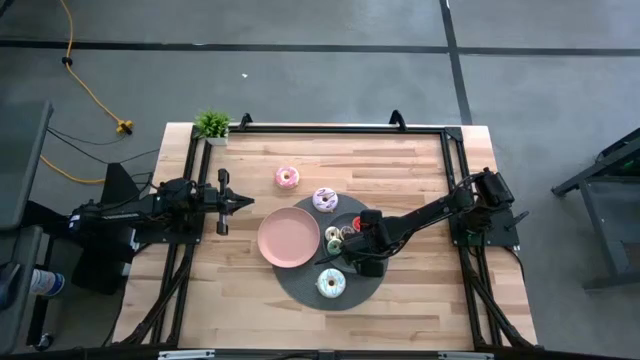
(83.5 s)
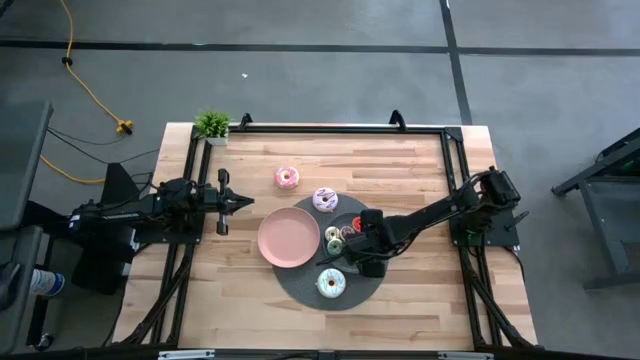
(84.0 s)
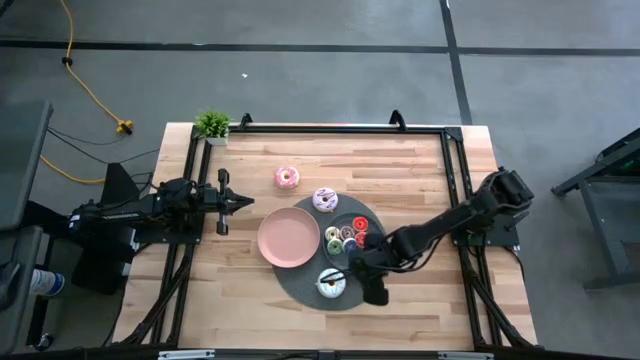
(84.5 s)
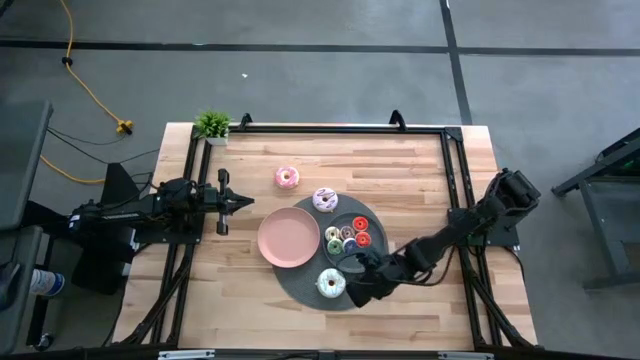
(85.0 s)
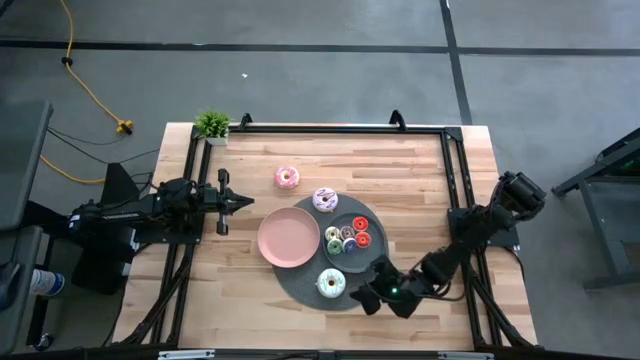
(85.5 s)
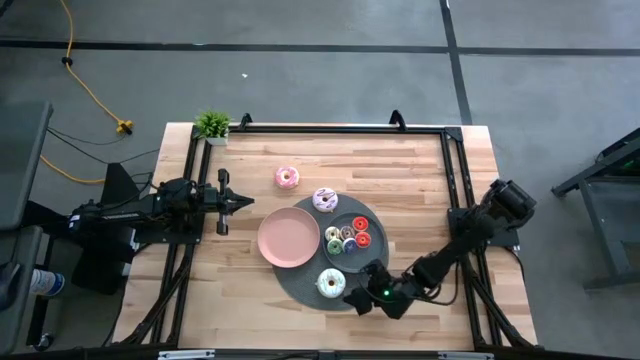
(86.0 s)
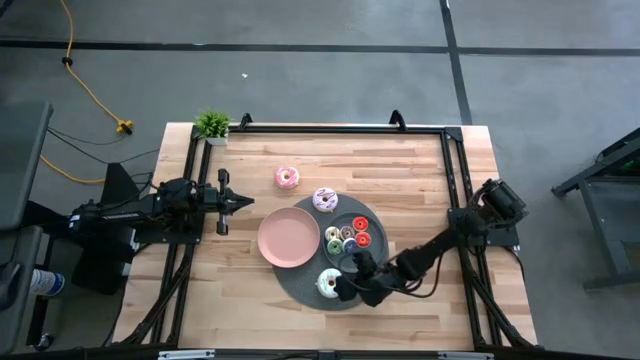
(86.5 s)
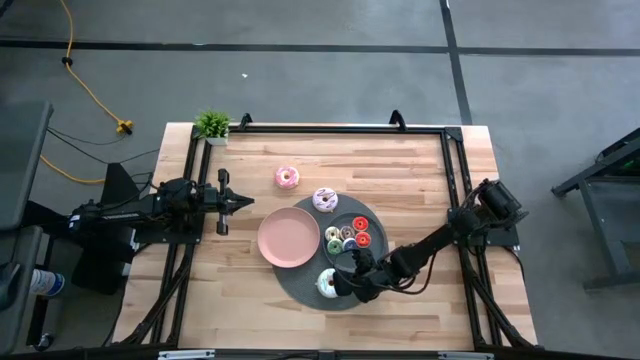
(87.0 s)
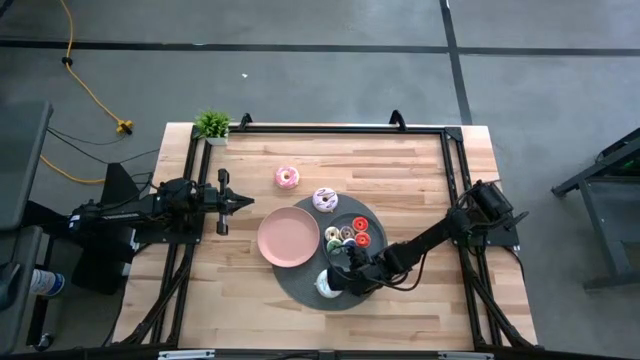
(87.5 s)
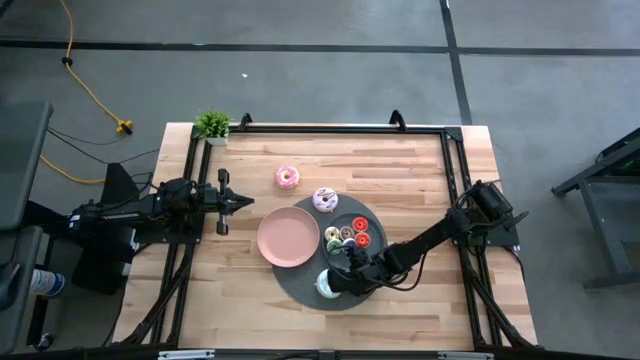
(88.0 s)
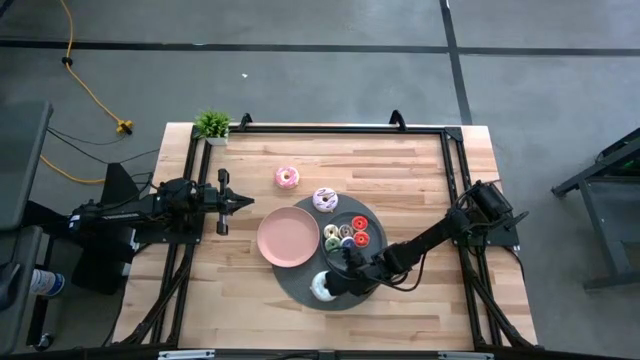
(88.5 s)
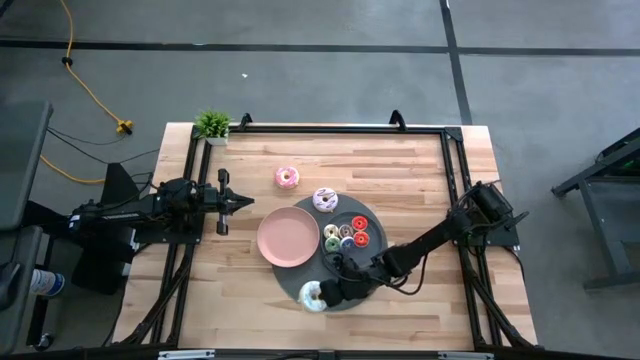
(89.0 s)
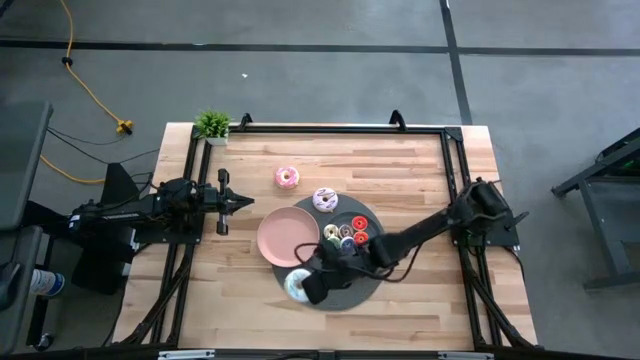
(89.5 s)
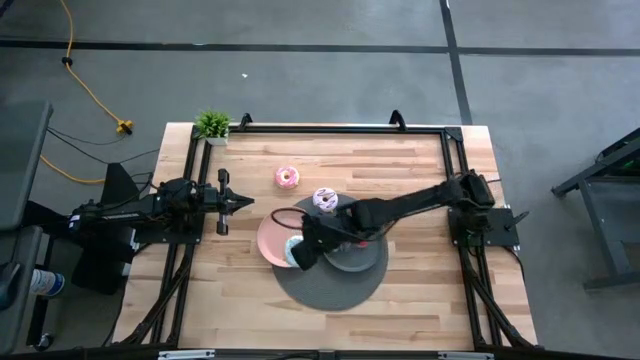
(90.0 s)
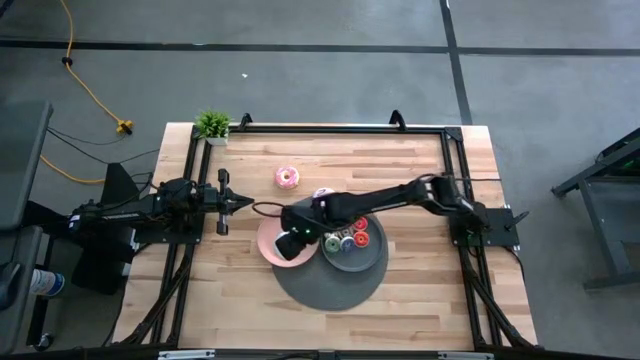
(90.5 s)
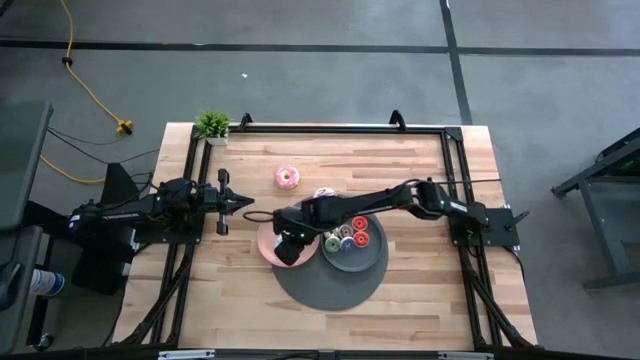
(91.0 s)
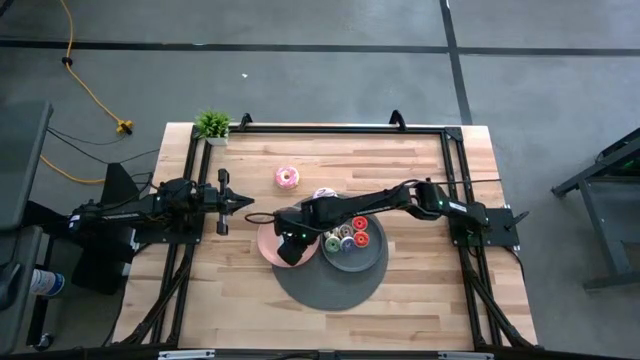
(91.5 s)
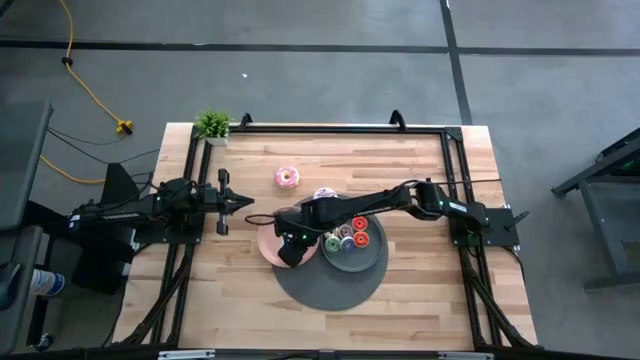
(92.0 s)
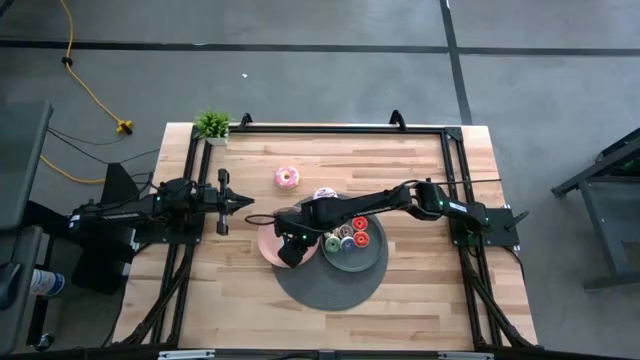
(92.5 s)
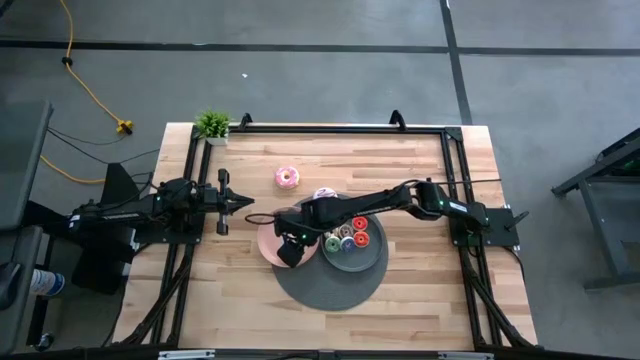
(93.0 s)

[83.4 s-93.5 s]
Task: Pick & Place donuts
Put the big white donut on the pink plate

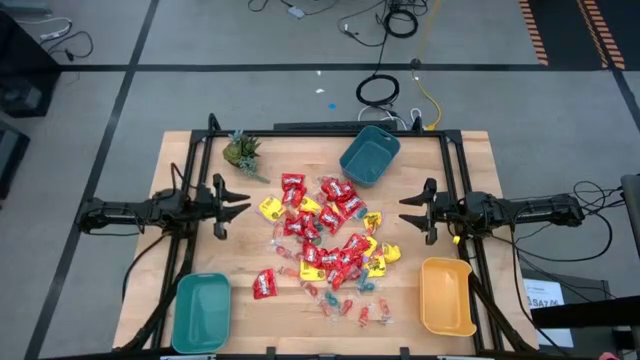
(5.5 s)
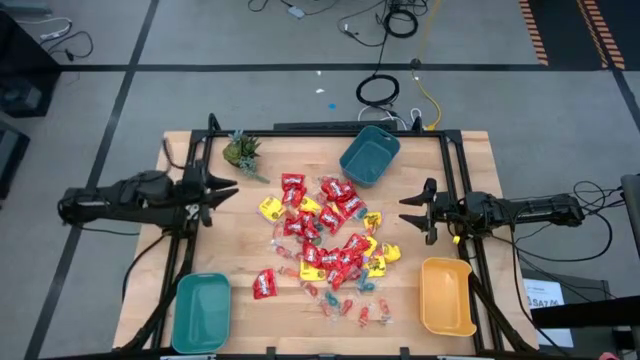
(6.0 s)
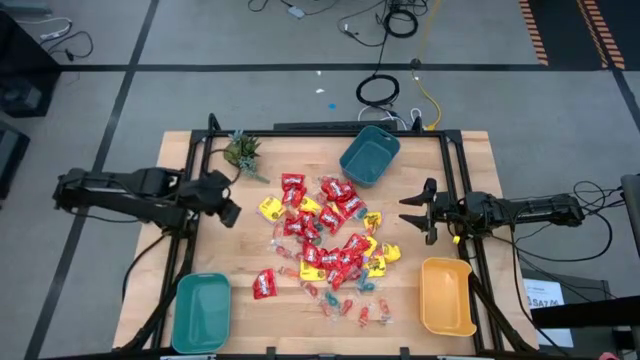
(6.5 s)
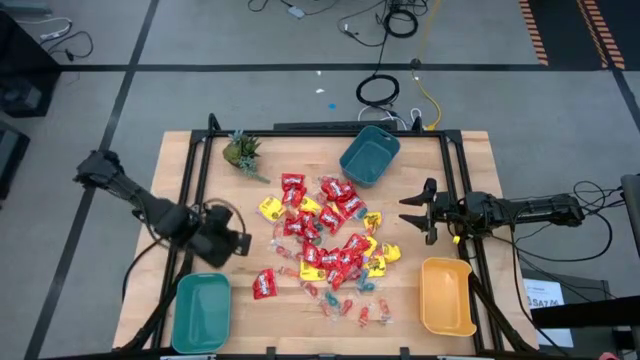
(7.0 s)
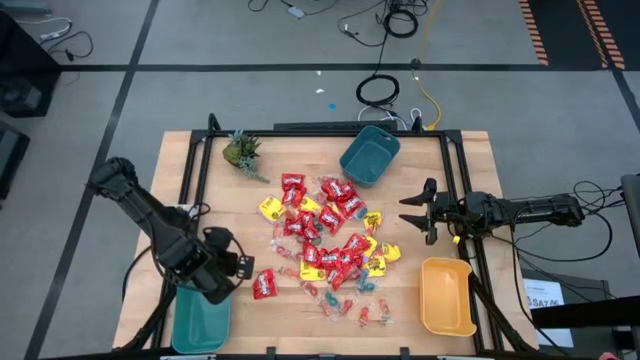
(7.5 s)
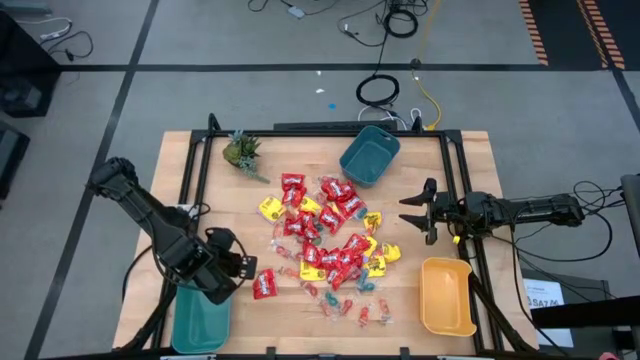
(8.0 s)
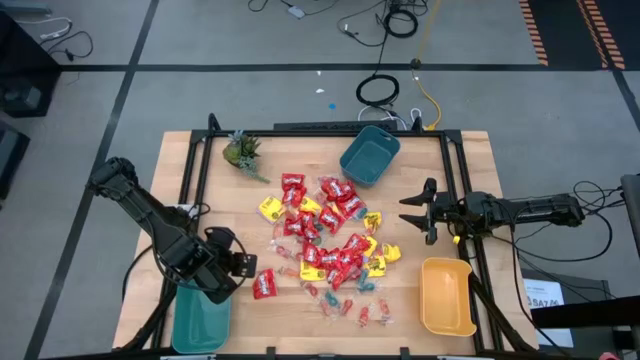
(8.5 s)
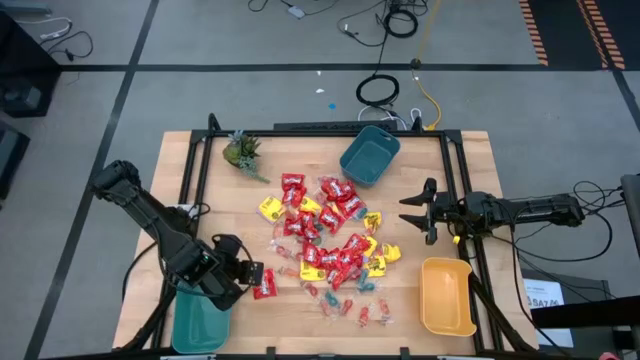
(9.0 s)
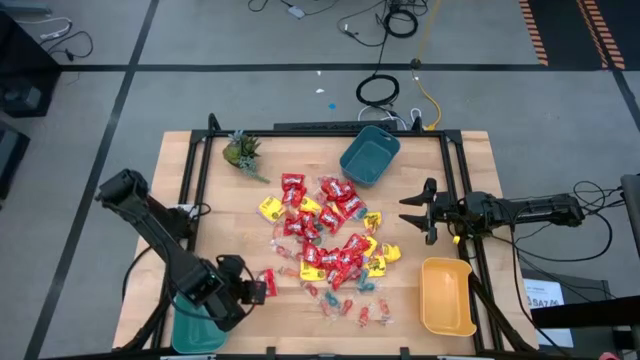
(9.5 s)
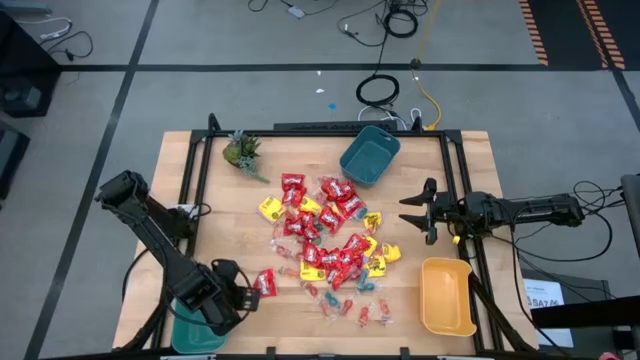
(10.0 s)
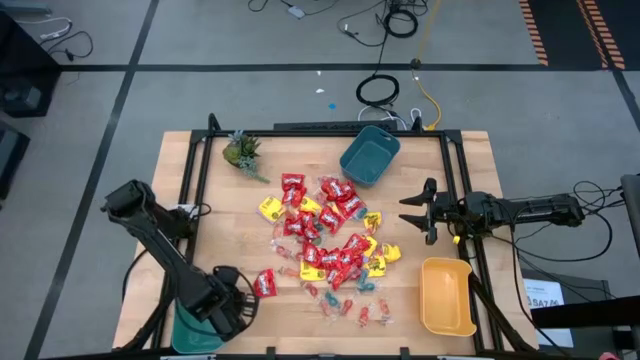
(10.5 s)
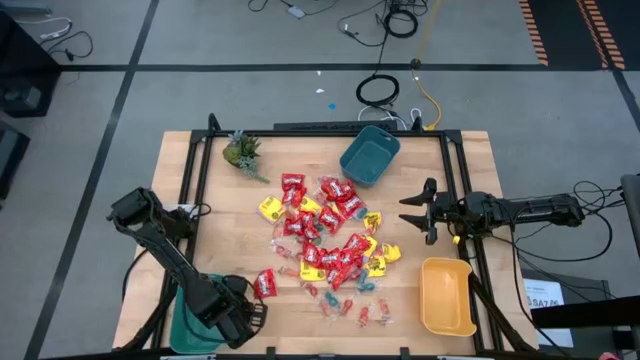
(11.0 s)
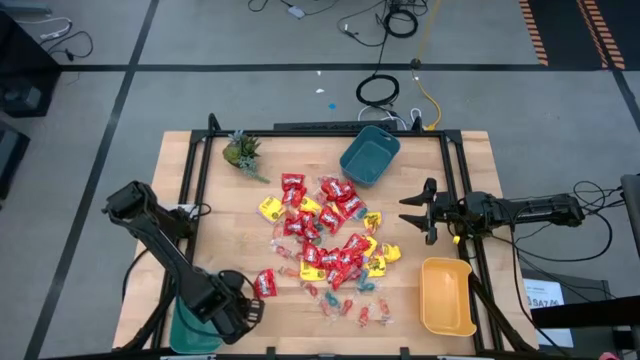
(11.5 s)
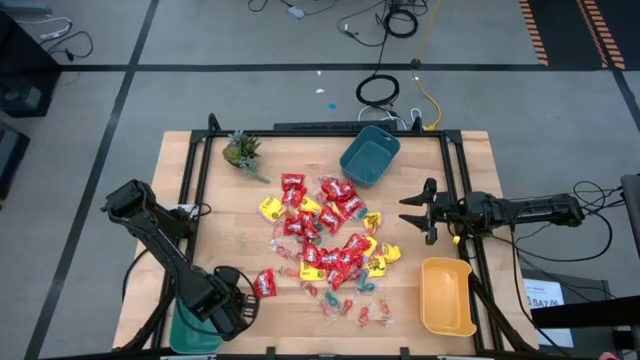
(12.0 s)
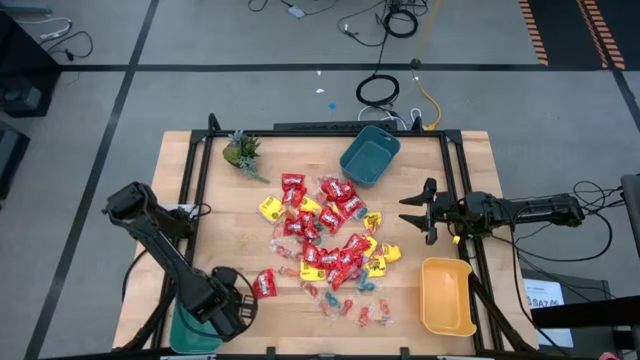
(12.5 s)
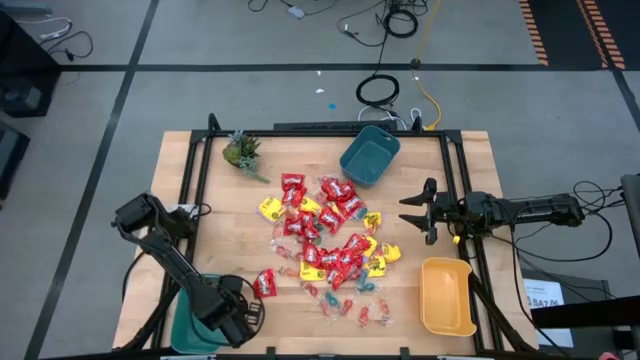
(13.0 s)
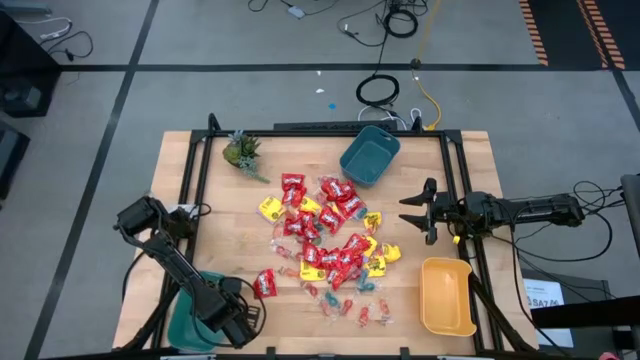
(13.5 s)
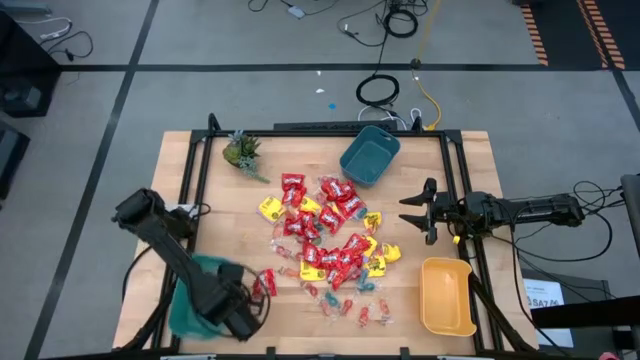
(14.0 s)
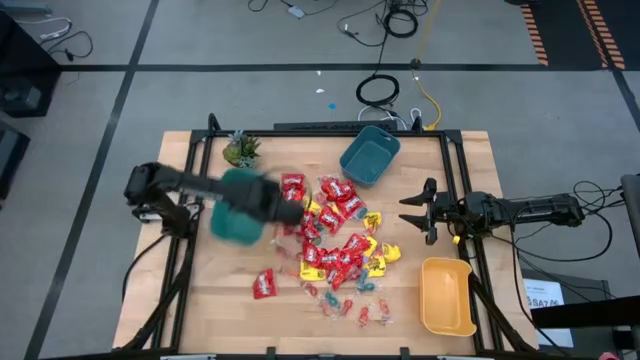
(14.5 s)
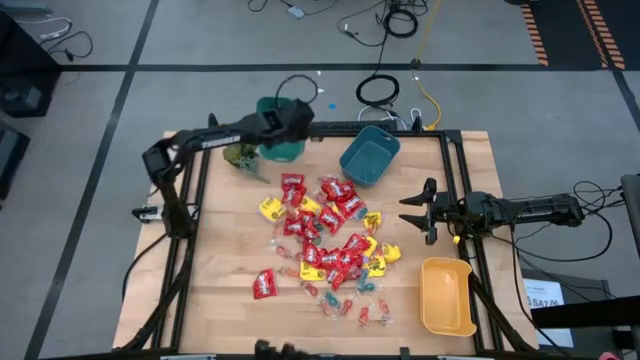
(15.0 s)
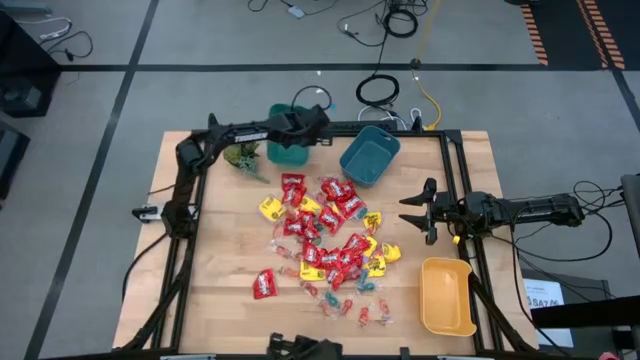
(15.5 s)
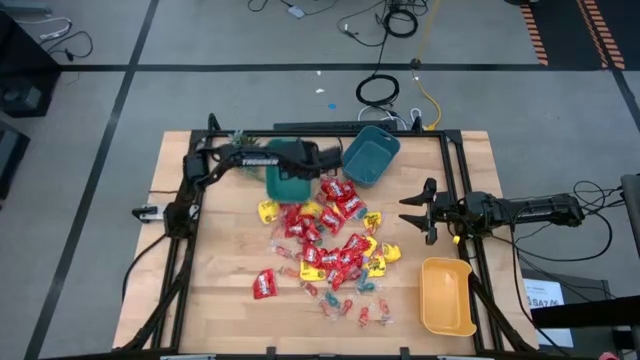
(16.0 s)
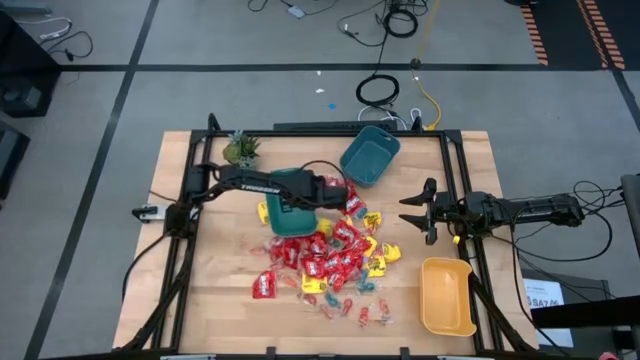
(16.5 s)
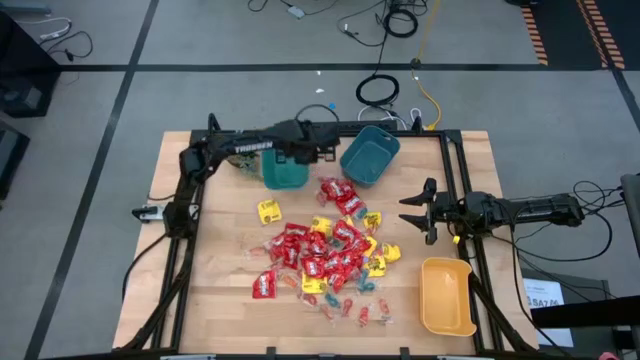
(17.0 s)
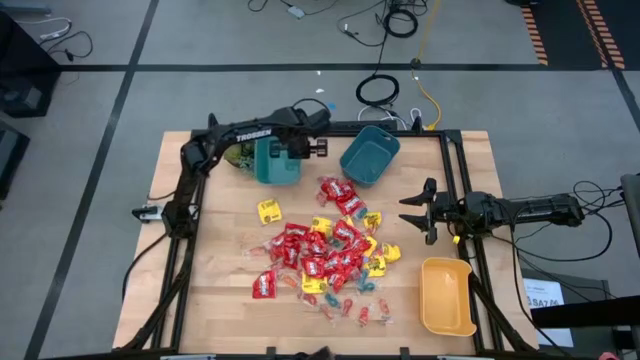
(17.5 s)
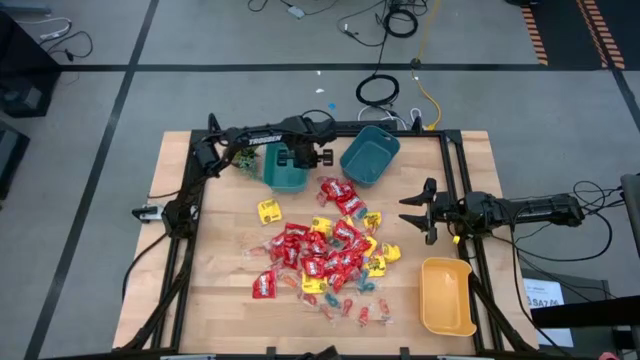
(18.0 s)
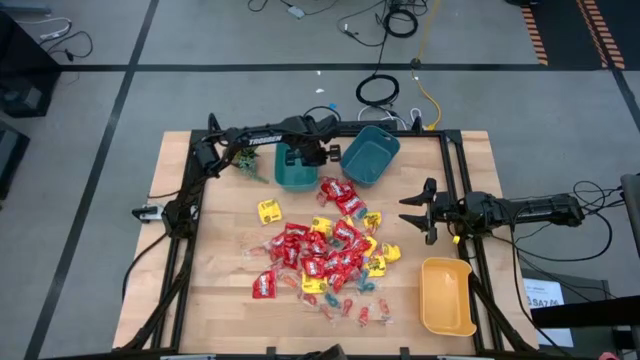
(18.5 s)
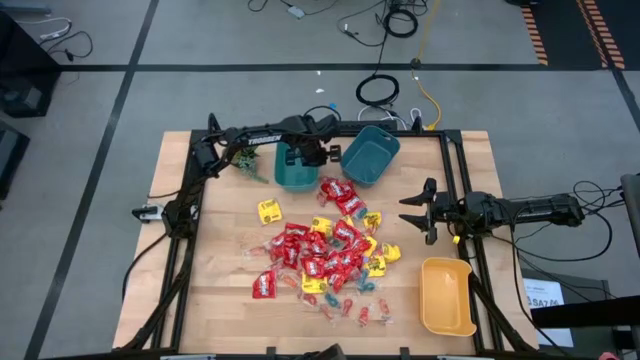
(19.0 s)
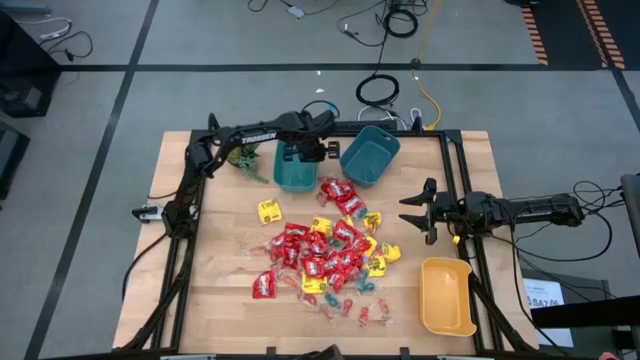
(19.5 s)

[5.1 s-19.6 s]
Task: Sort candy
Move the green bin to the top left of the table
